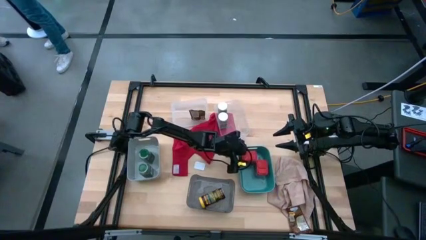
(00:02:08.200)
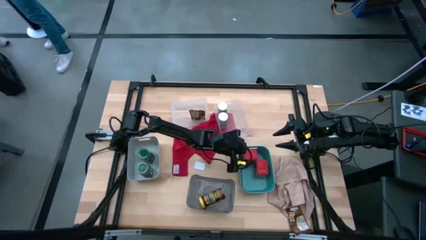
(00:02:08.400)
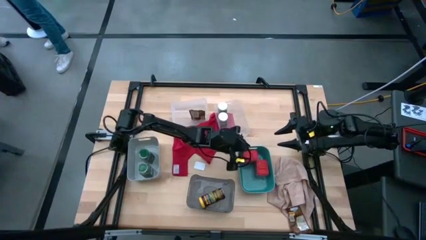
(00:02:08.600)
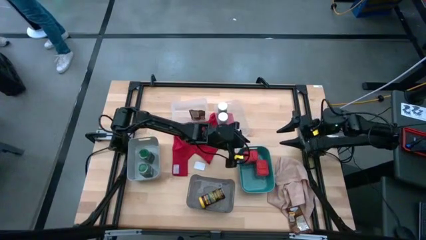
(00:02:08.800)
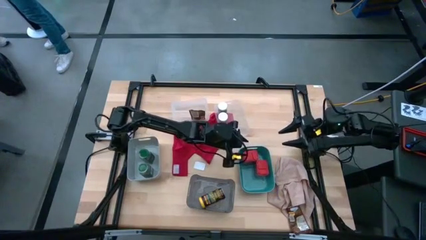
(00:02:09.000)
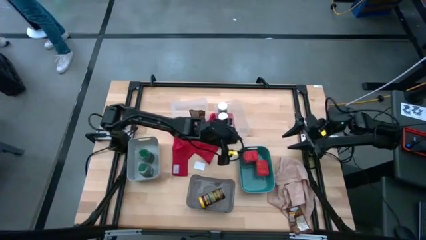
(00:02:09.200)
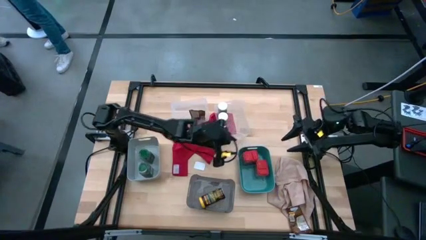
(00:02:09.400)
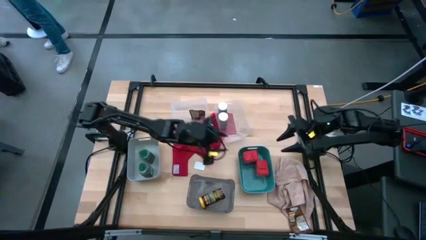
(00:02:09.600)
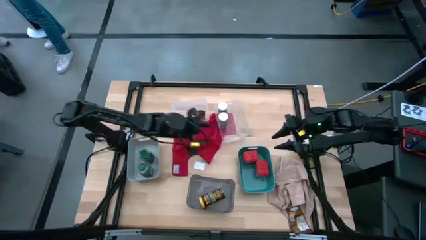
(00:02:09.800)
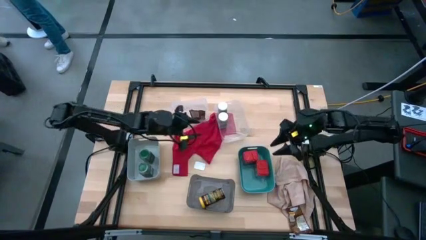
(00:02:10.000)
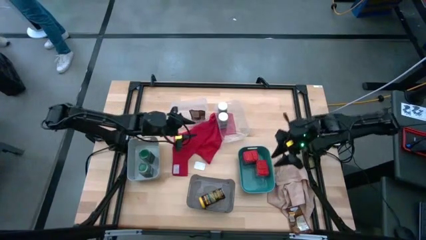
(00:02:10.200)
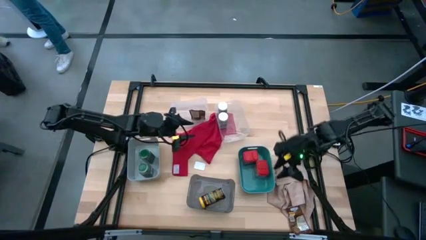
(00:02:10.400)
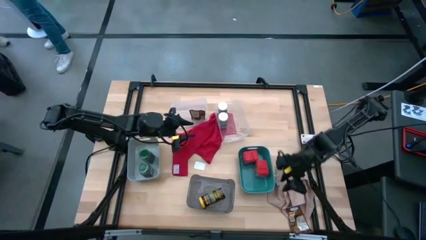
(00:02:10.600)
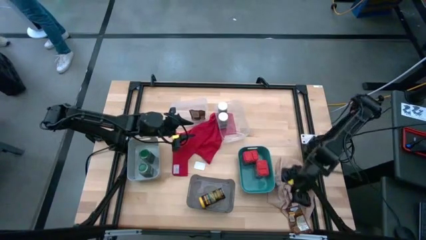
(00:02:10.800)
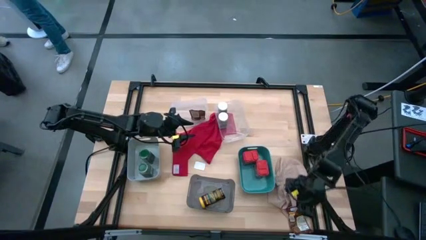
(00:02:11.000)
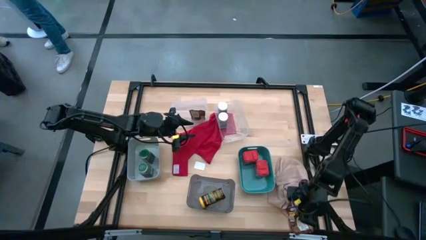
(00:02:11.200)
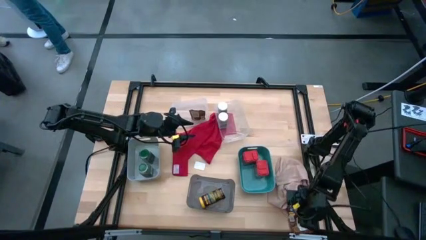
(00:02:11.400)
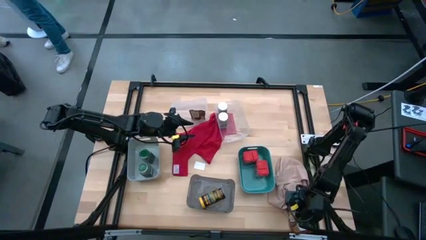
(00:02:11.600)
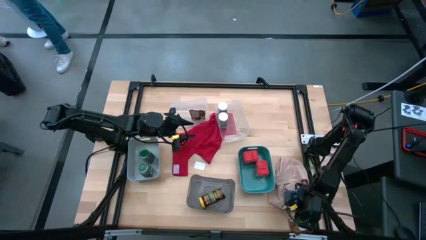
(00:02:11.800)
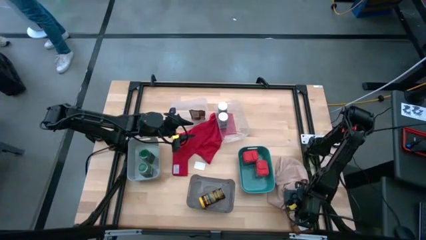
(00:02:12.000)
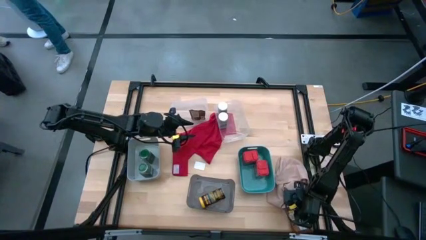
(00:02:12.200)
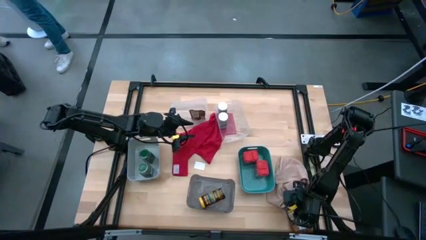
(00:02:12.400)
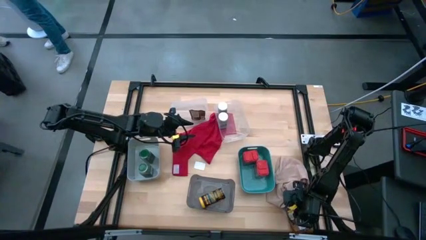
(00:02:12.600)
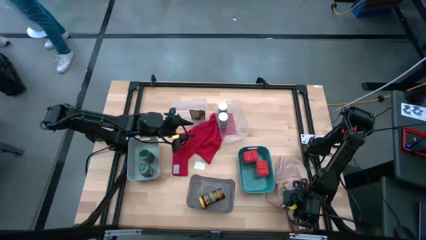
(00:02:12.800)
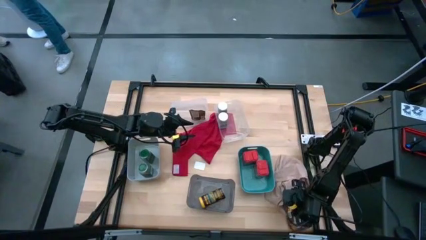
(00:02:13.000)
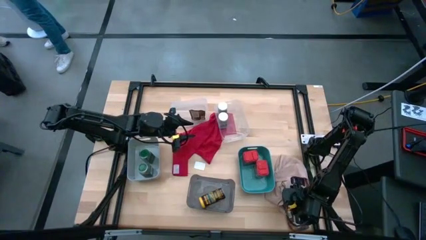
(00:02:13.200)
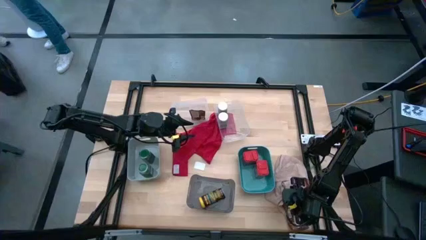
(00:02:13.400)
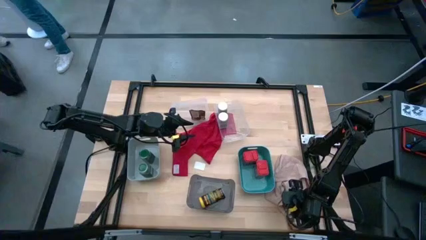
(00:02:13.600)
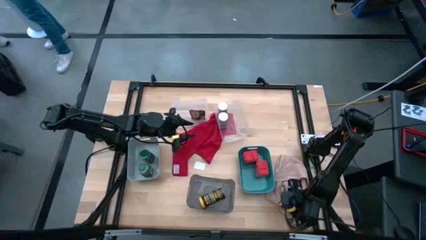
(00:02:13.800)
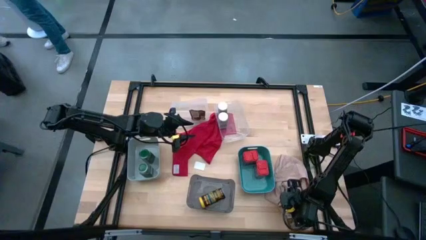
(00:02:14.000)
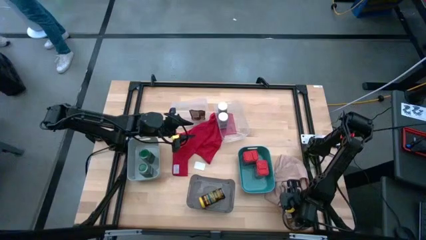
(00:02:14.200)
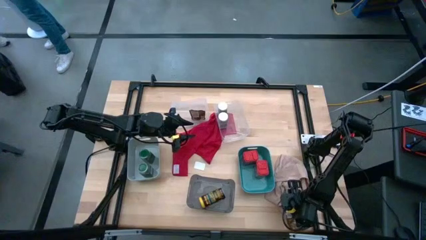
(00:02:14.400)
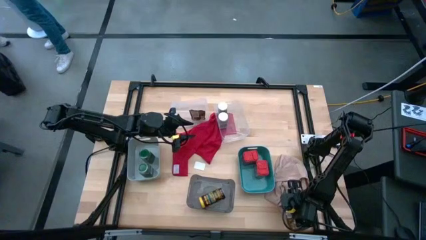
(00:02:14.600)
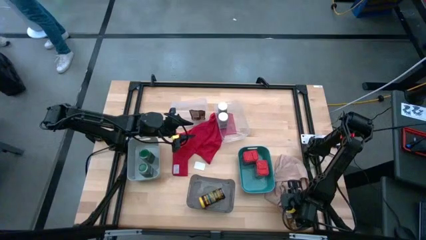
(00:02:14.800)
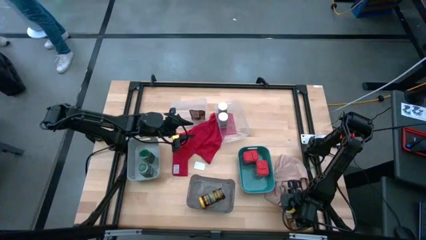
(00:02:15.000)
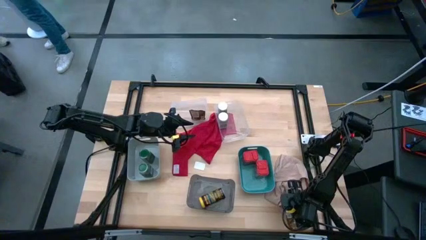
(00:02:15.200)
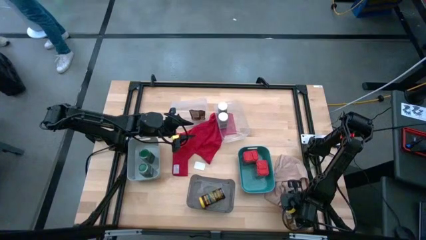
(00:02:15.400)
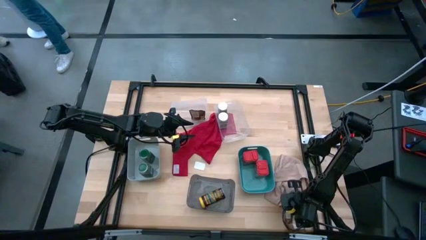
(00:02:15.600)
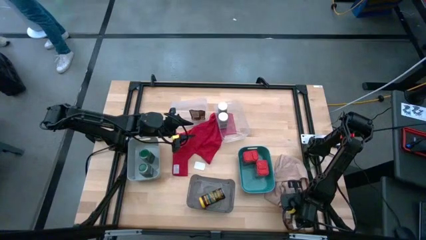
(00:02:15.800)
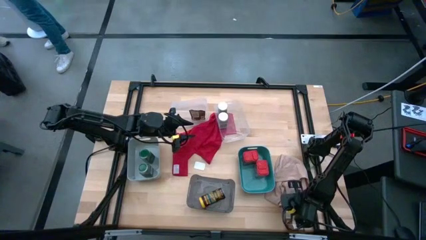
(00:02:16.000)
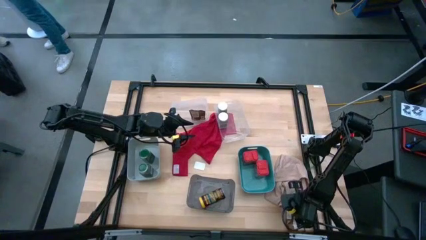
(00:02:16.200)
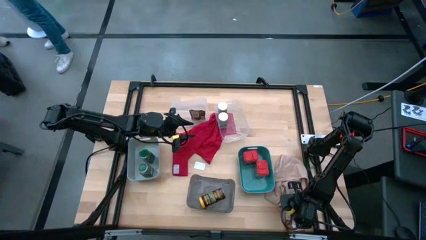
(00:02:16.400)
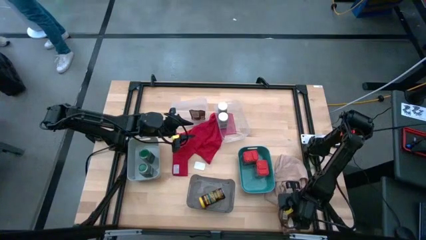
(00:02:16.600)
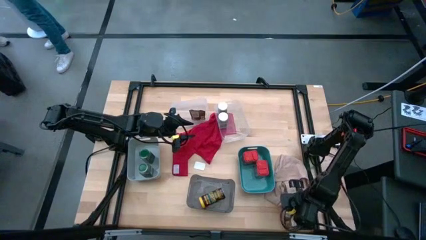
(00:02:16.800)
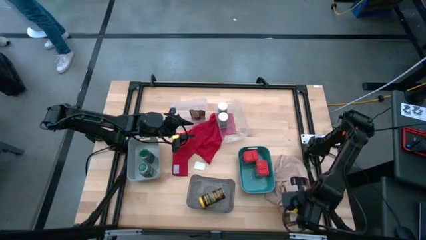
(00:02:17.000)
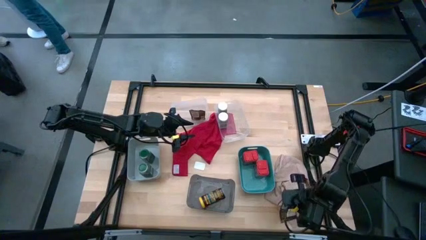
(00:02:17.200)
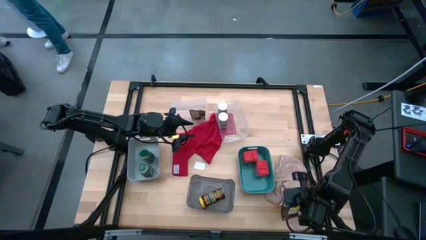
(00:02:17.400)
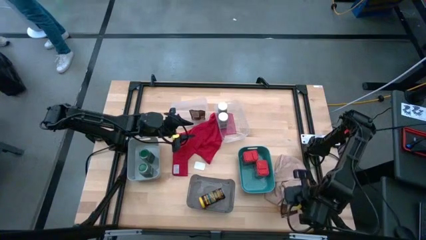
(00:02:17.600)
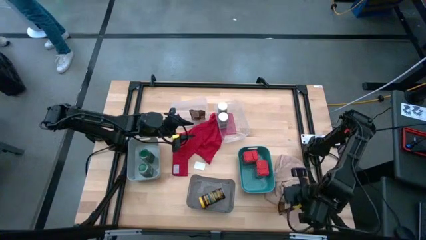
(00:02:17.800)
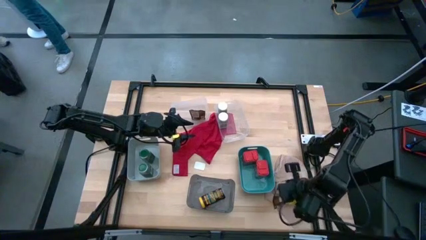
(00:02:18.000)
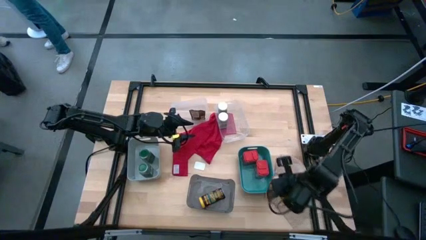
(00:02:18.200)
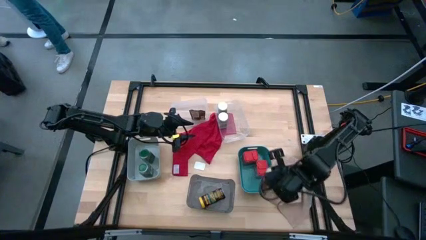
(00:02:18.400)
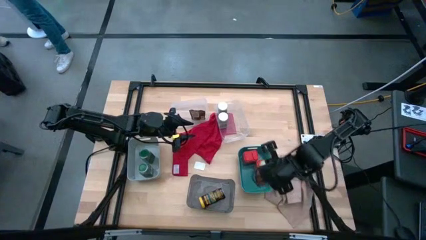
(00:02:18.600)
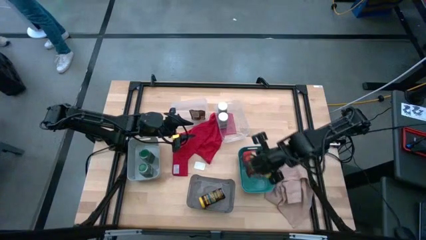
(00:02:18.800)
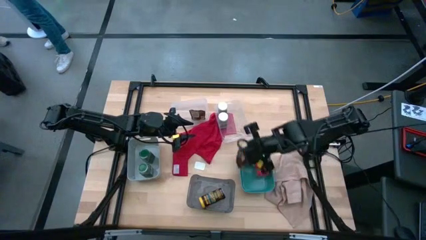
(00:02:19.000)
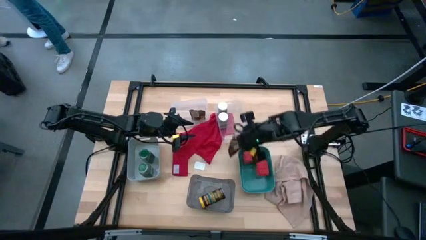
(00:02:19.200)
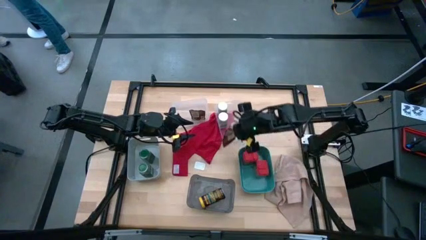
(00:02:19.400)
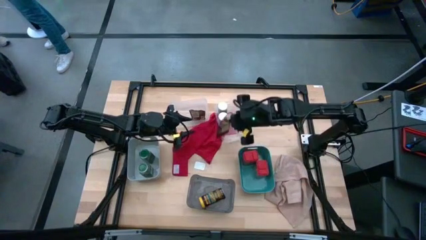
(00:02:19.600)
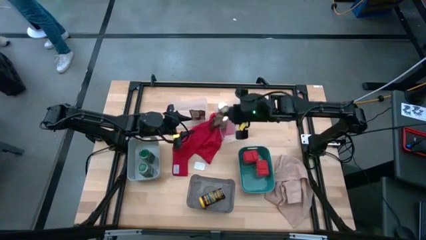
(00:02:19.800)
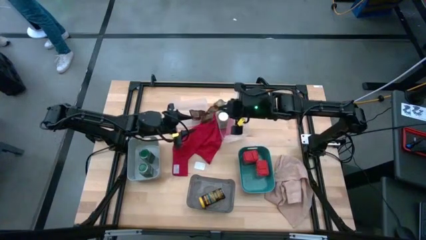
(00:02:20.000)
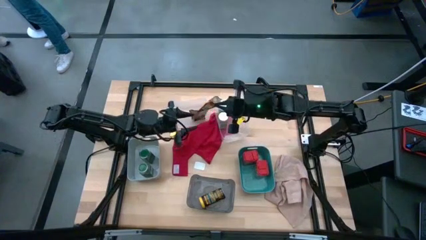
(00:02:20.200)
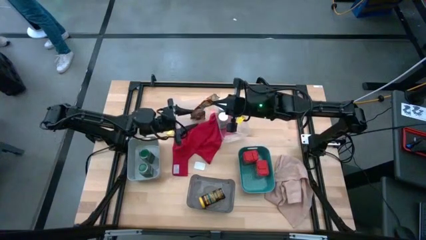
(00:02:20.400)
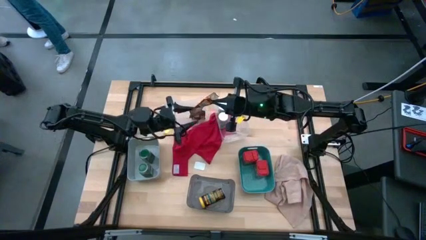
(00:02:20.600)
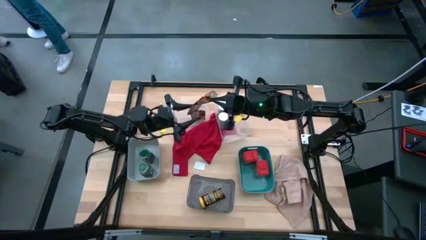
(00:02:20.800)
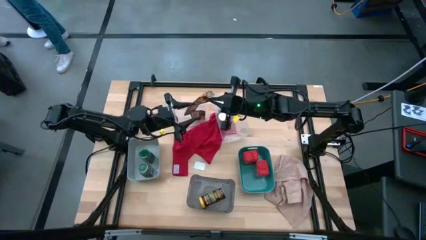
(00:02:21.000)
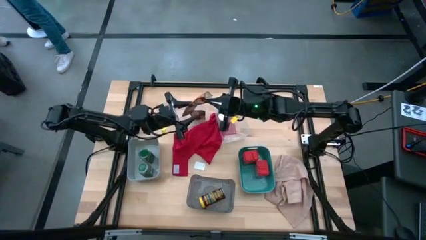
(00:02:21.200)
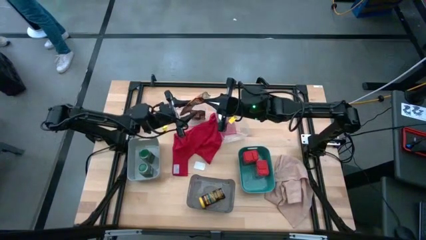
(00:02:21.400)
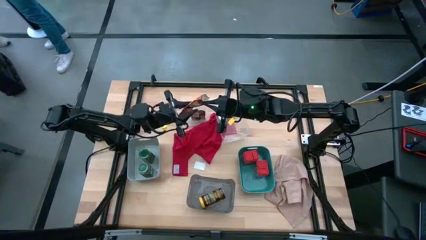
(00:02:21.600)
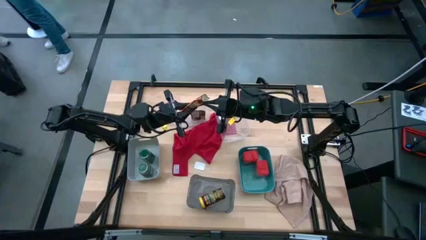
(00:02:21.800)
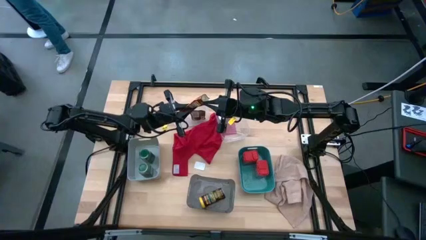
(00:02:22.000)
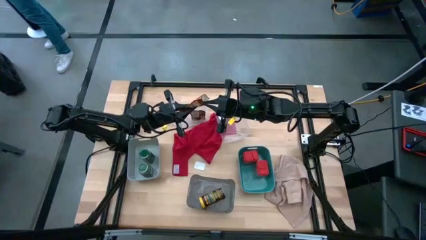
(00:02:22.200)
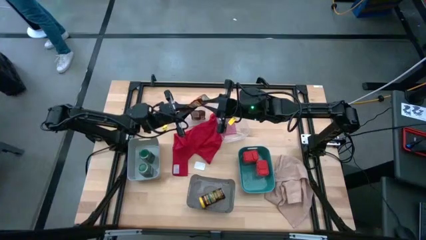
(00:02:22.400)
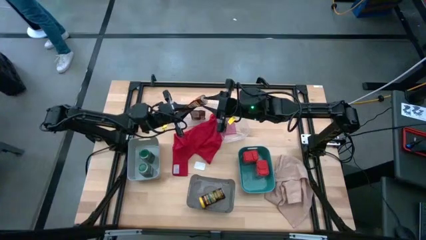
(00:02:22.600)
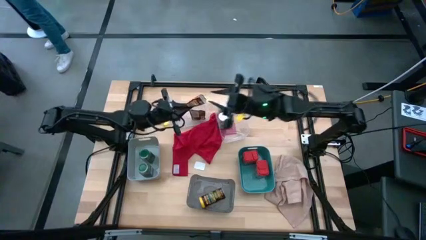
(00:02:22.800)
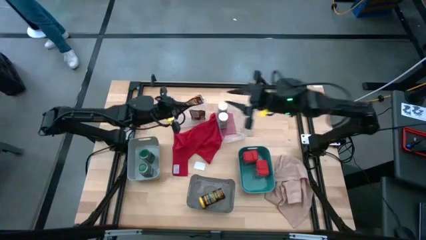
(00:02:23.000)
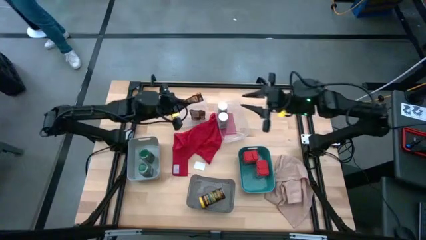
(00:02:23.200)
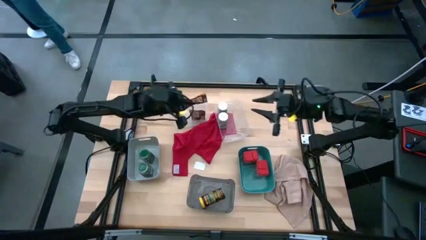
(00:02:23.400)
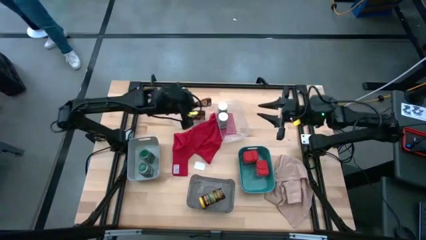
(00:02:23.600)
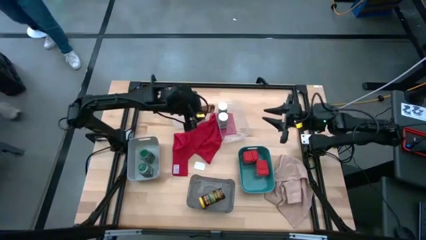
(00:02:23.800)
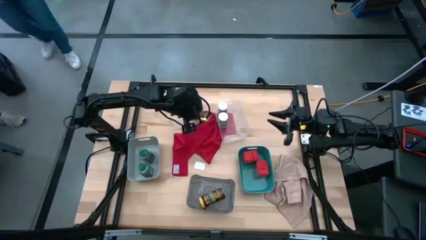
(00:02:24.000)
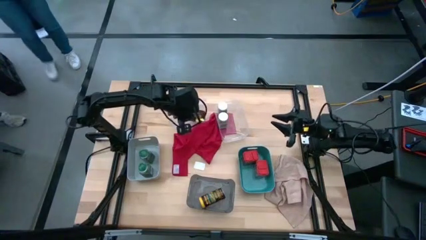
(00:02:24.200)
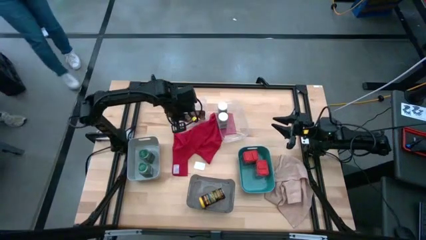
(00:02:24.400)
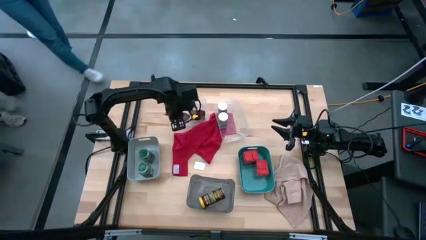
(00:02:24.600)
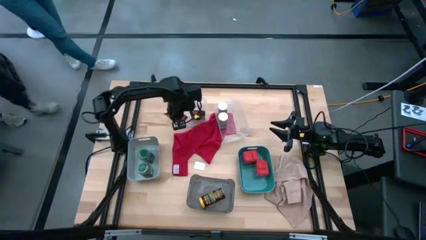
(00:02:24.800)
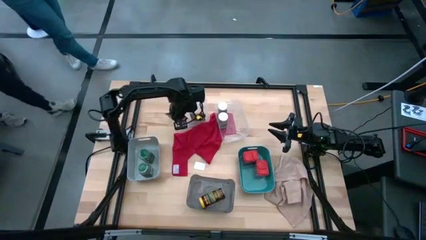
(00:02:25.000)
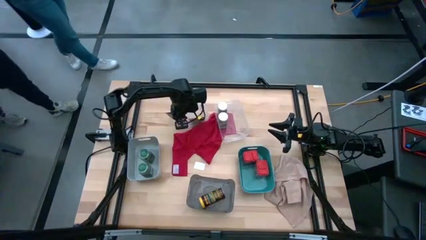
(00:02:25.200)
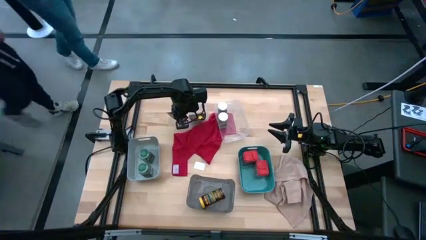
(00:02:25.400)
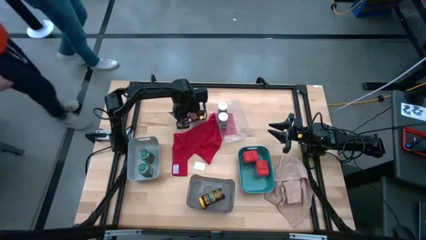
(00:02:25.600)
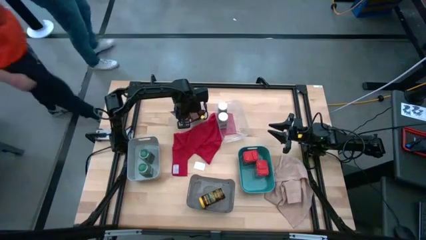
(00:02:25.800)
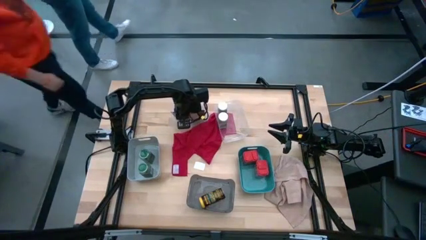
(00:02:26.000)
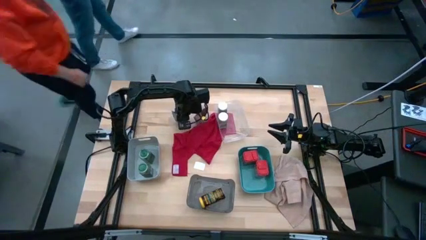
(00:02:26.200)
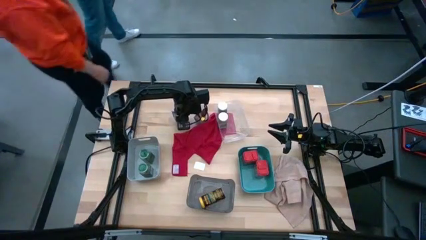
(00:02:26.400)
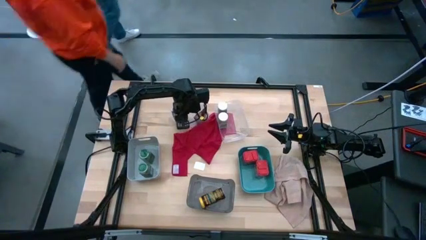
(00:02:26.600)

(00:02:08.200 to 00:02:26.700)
Task: Sort spices by type
Put the orange seasoning pack into the left transparent bin
